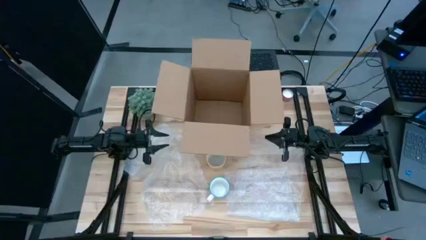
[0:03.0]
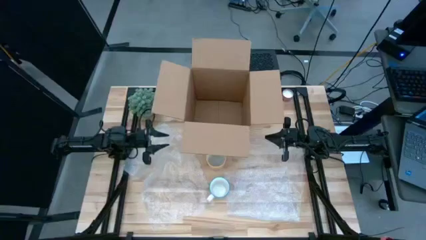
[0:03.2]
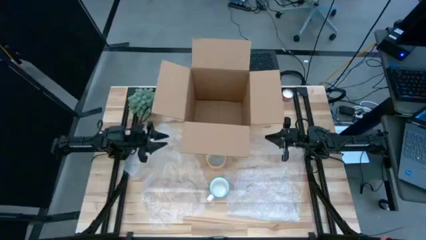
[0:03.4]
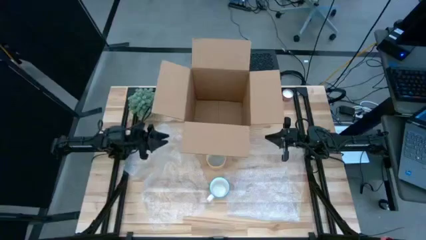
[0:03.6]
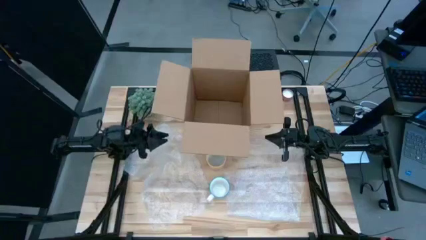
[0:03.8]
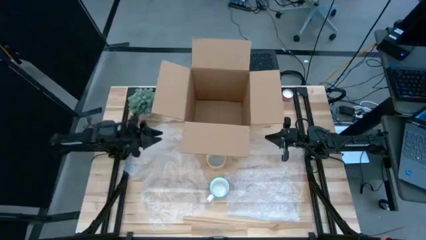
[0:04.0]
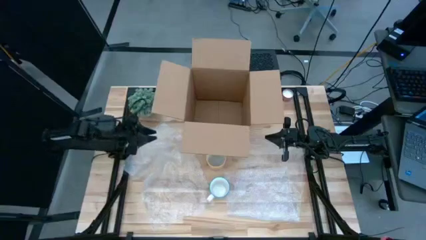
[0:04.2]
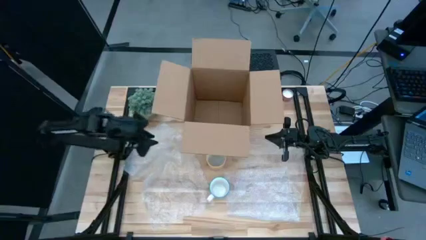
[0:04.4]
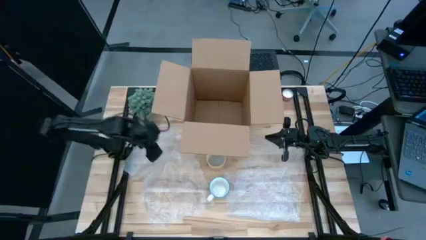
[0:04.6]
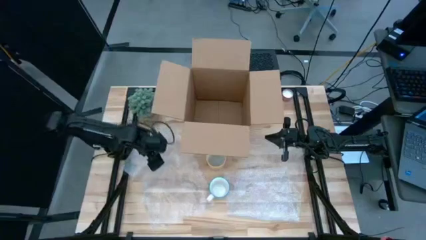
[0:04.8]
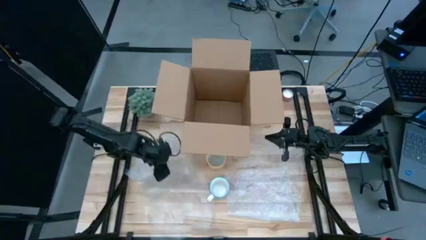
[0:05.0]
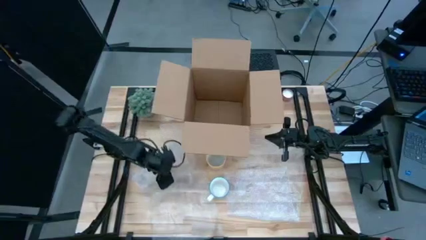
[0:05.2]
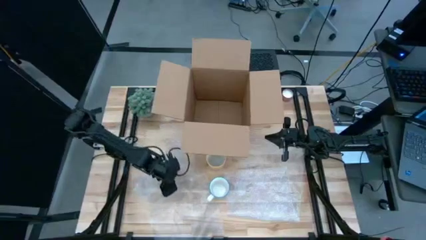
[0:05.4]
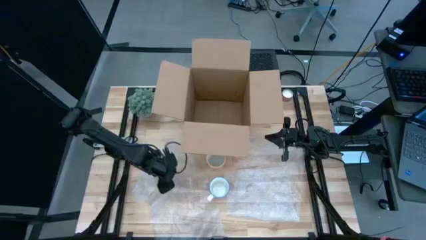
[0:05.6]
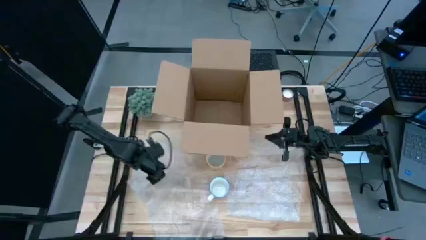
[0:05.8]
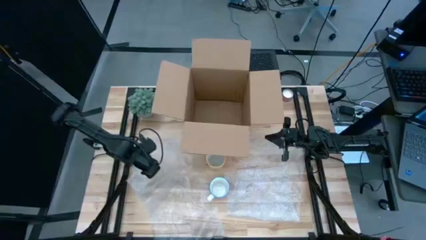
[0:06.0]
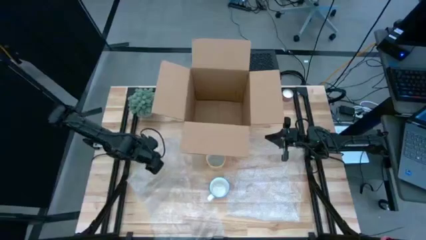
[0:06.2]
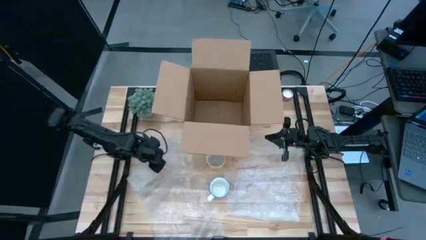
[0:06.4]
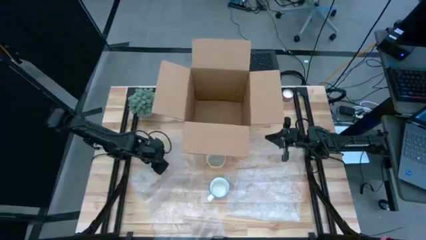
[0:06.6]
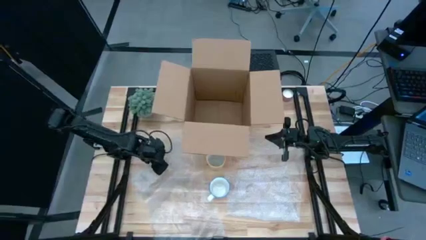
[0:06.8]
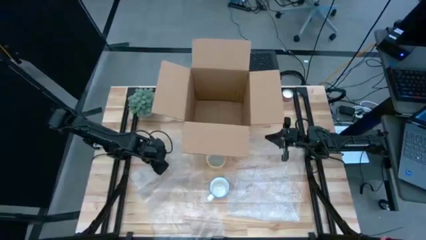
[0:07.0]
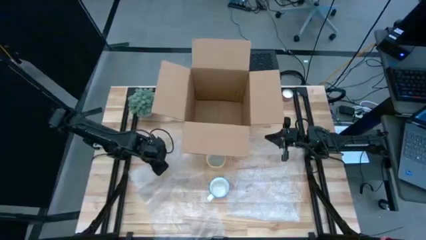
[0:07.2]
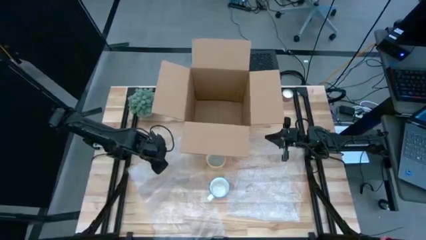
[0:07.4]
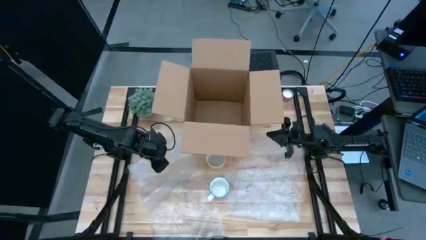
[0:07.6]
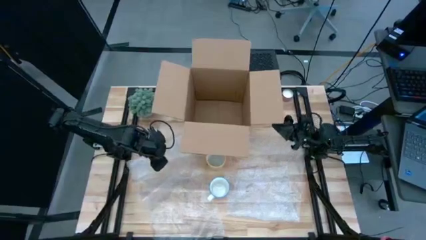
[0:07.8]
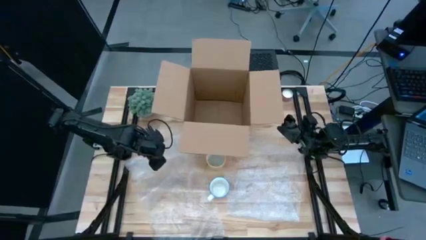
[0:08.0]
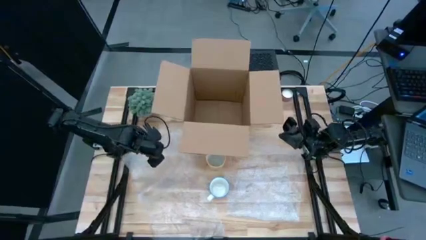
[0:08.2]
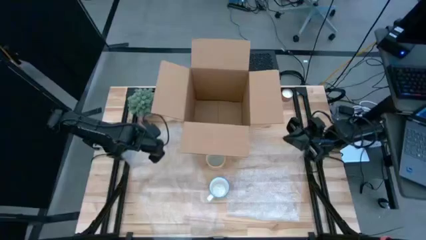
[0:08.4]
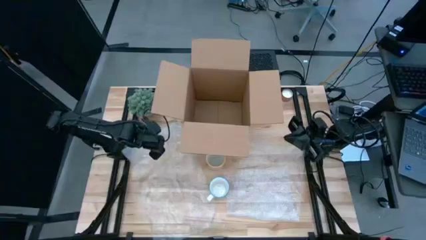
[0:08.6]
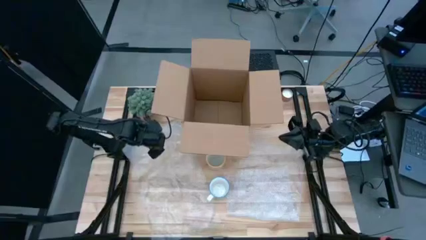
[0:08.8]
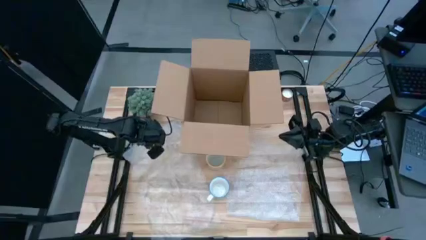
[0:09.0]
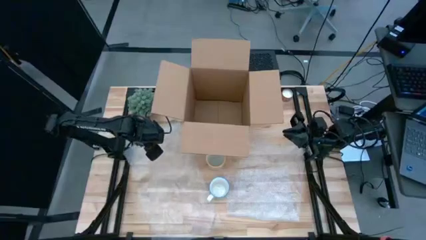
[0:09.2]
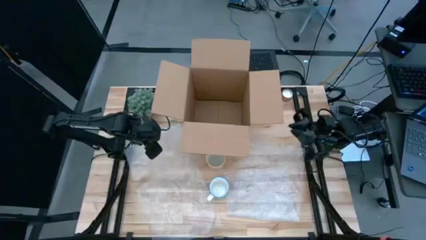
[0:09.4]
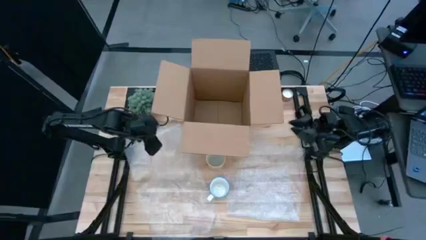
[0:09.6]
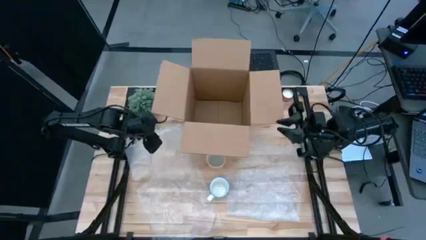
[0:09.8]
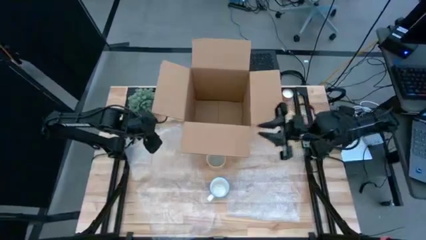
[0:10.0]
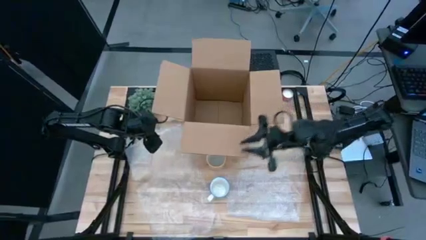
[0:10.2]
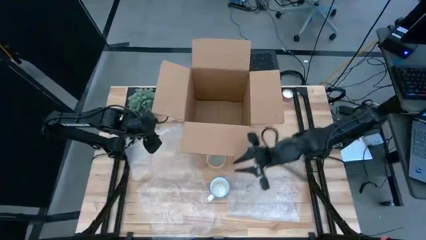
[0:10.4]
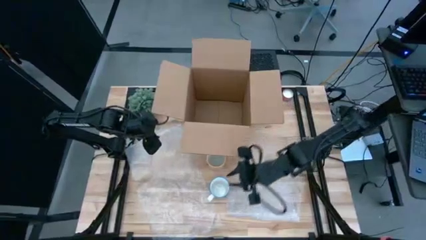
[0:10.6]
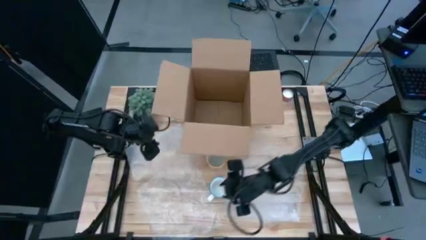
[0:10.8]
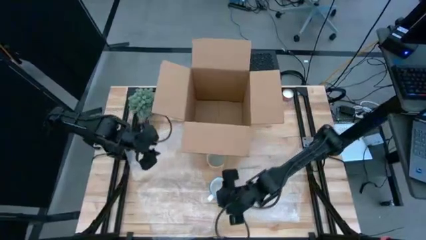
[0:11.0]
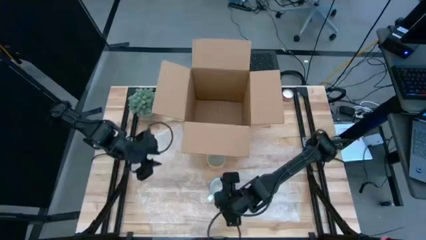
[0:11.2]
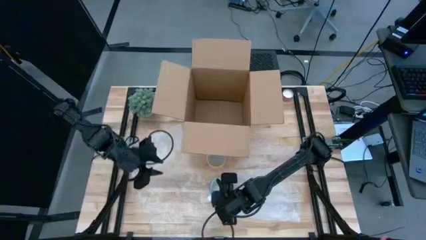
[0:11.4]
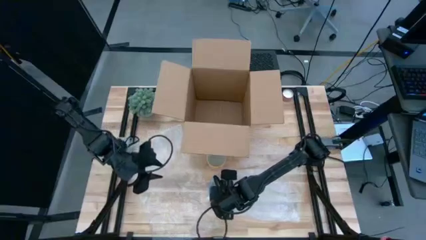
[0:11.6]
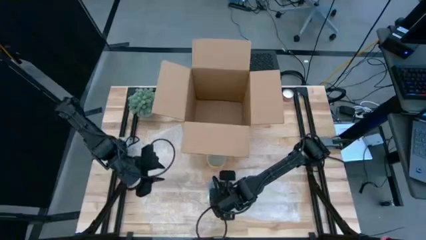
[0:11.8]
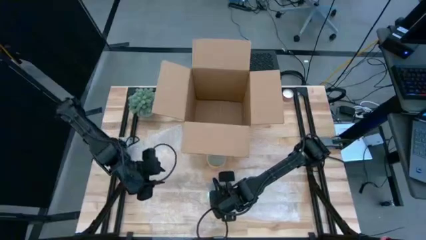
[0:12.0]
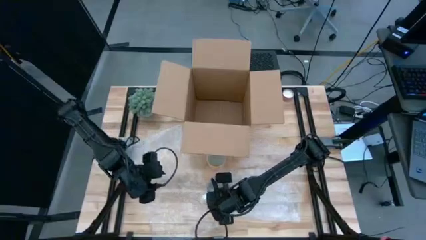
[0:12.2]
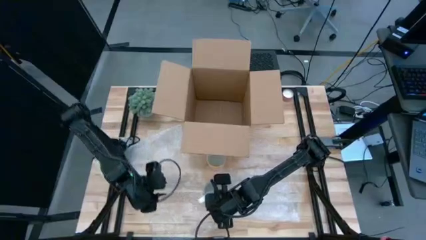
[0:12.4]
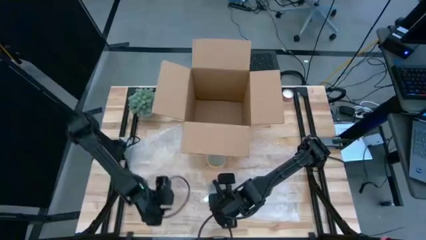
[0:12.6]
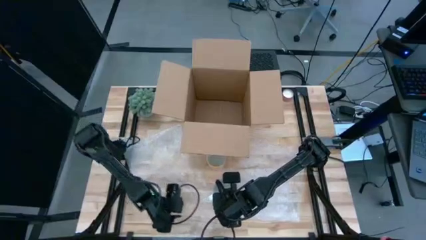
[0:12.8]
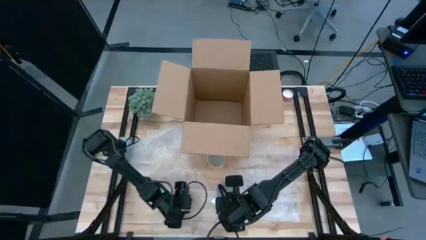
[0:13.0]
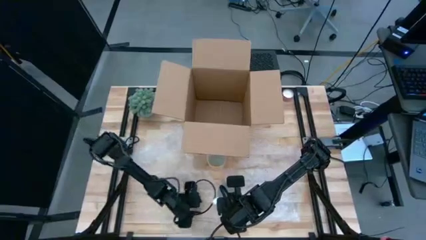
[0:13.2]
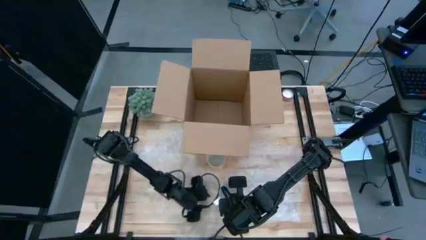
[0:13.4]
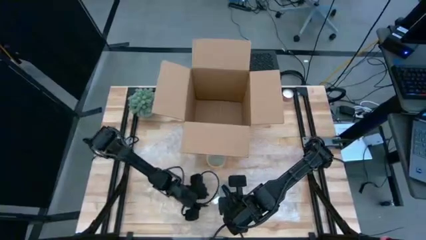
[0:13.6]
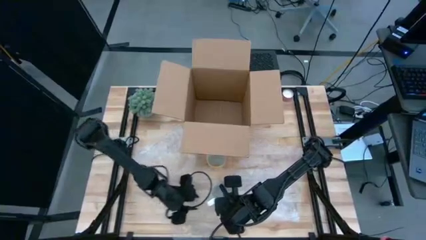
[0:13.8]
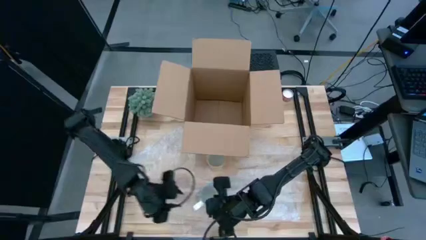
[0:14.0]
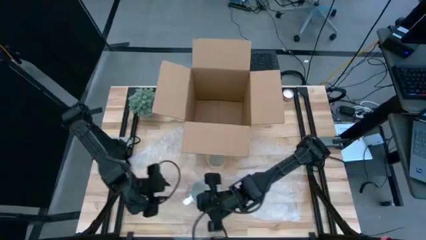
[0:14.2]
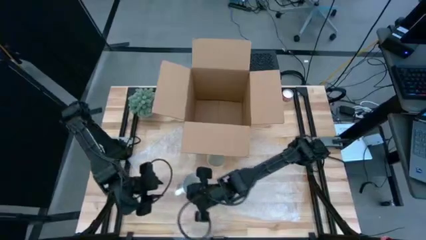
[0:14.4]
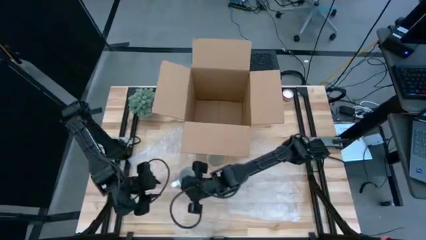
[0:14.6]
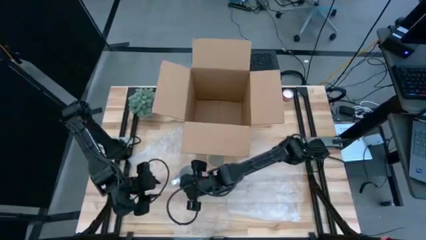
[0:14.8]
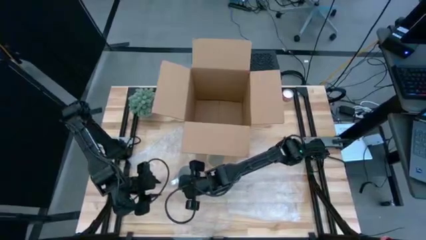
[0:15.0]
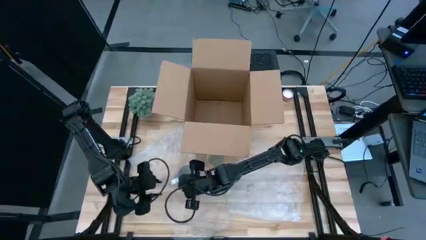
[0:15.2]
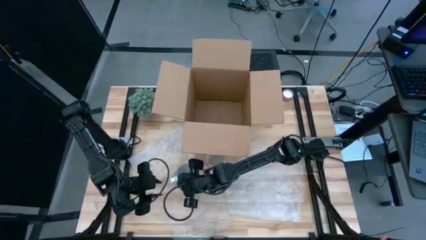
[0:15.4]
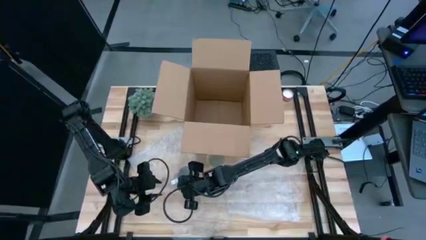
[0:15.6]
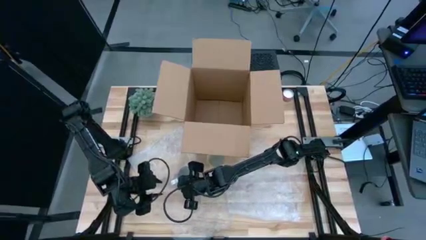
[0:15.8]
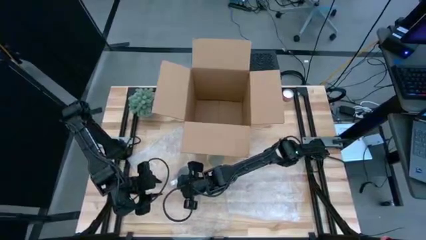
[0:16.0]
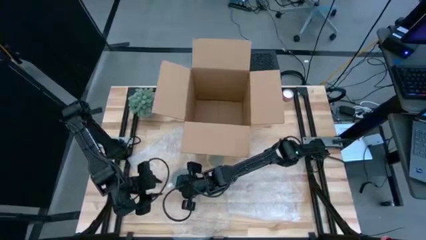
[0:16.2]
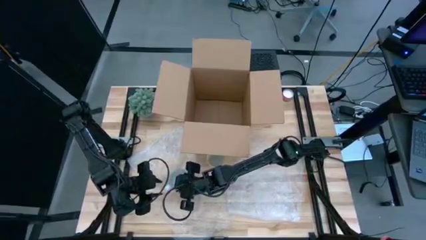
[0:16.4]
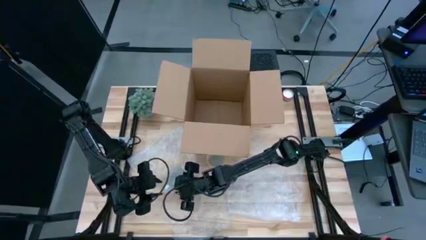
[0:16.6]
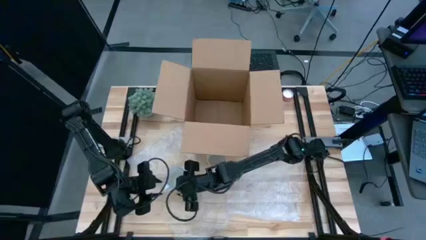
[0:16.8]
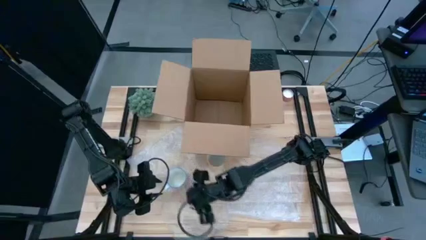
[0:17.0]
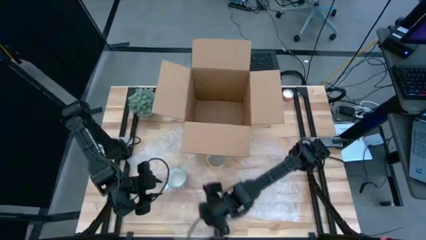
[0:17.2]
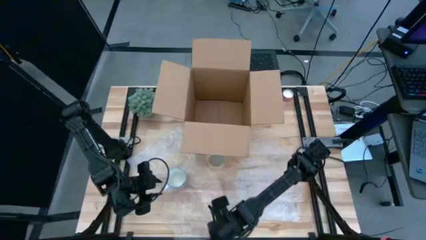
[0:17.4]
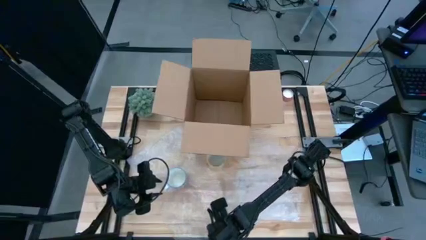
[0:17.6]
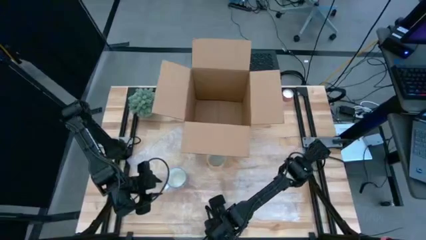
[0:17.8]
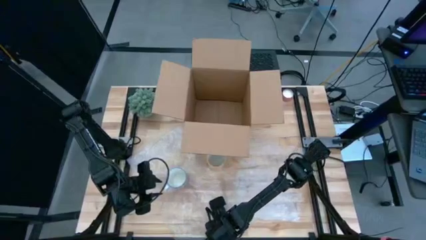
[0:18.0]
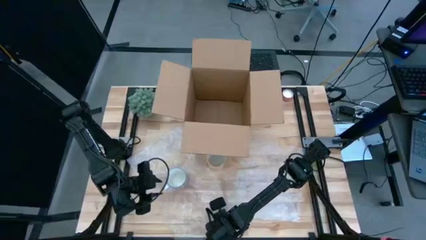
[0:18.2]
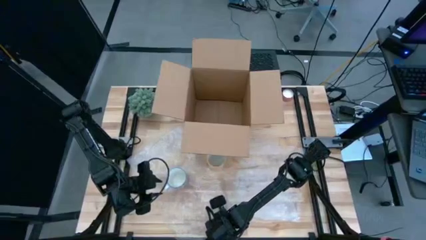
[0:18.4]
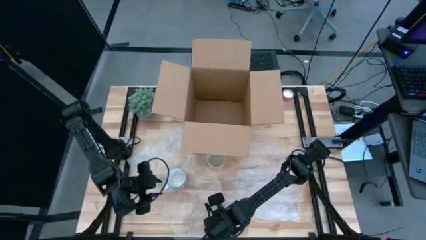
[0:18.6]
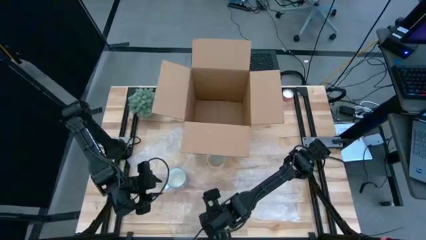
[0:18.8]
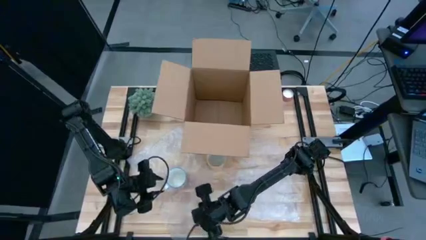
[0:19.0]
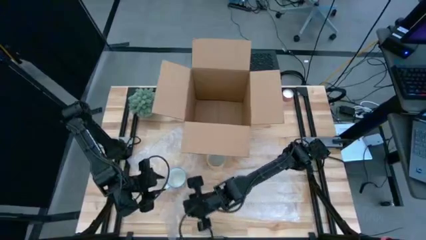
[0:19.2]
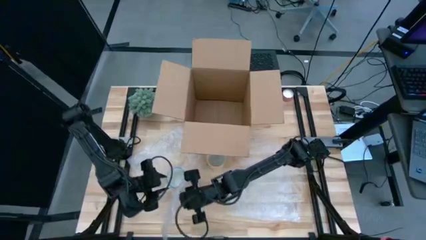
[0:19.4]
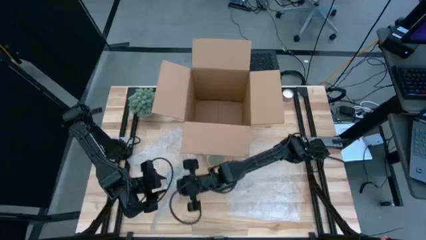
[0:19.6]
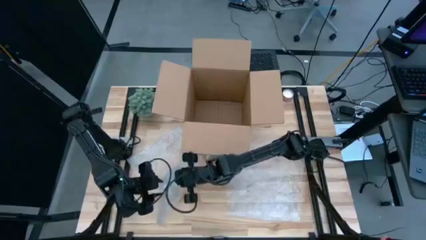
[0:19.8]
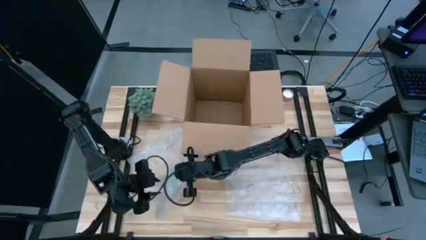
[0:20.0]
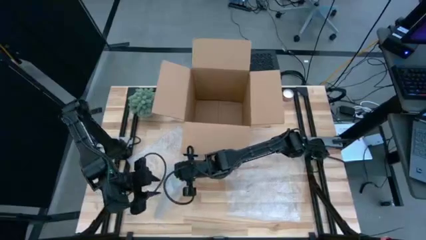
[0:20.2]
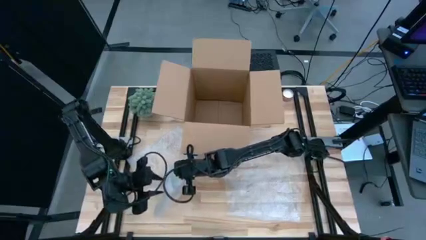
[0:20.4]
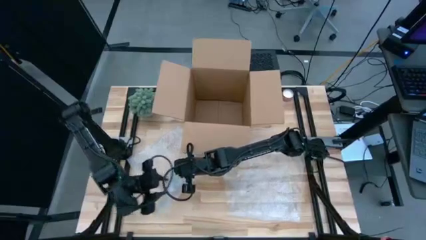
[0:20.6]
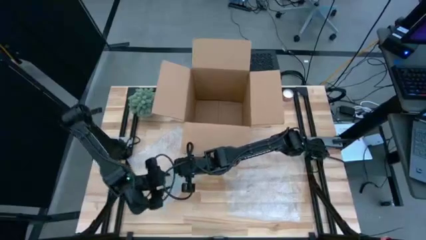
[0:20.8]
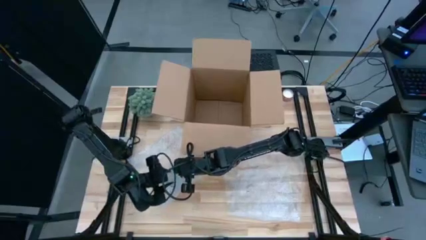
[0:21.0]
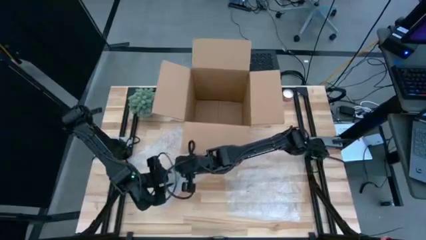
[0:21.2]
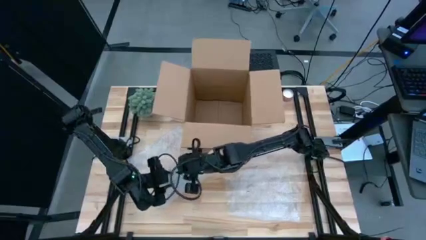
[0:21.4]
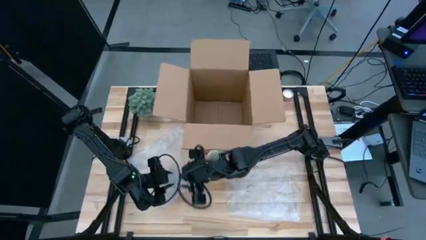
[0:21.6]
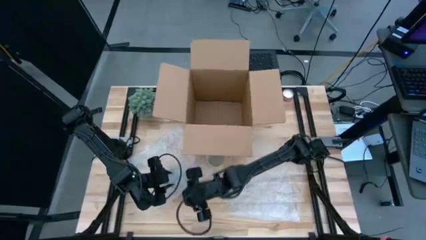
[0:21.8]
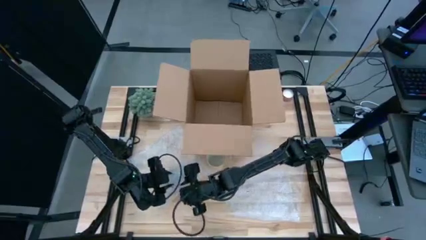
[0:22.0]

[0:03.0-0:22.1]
Task: wrap mug
Wrap the red patterned mug with bubble wrap
